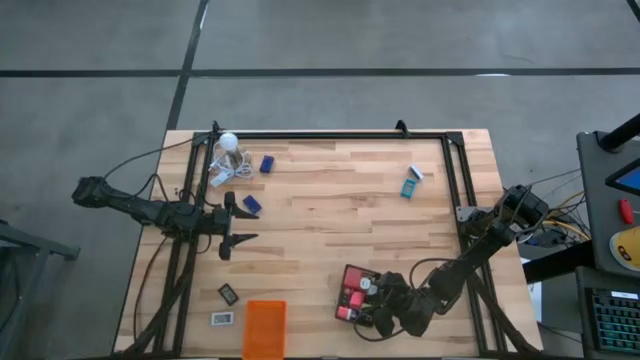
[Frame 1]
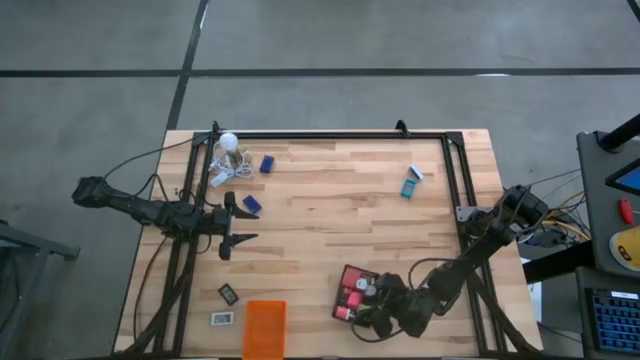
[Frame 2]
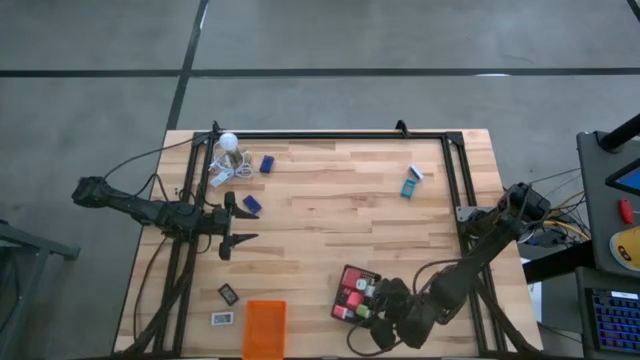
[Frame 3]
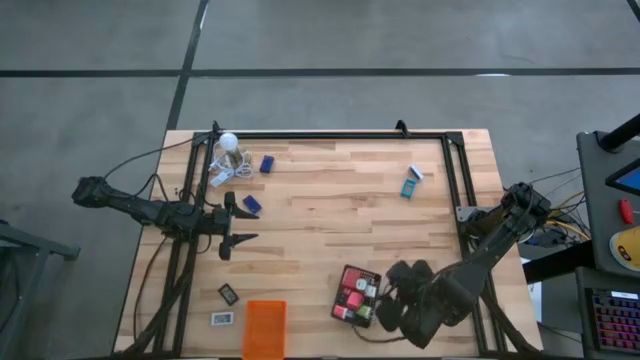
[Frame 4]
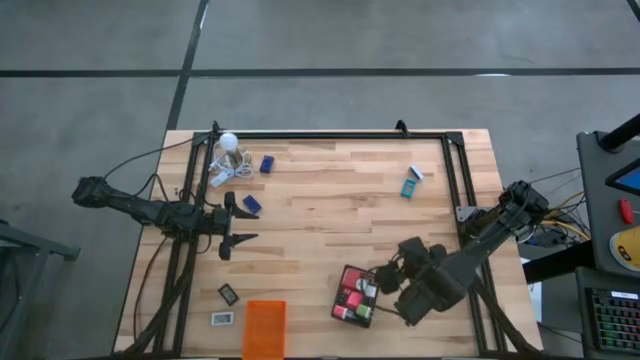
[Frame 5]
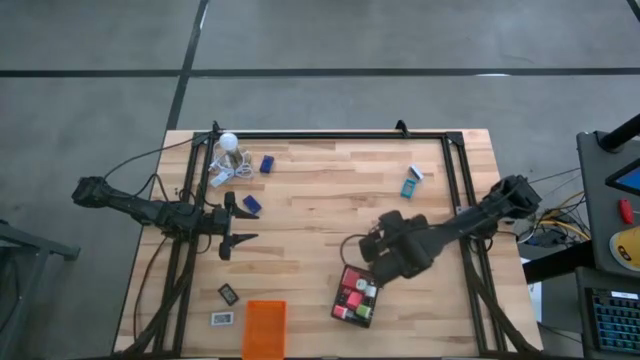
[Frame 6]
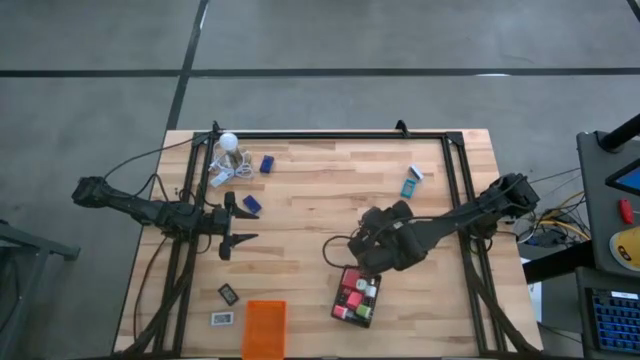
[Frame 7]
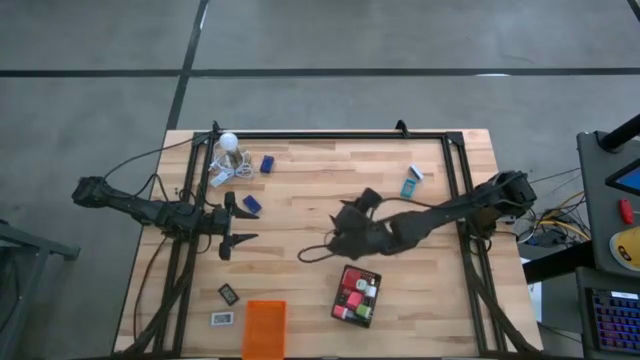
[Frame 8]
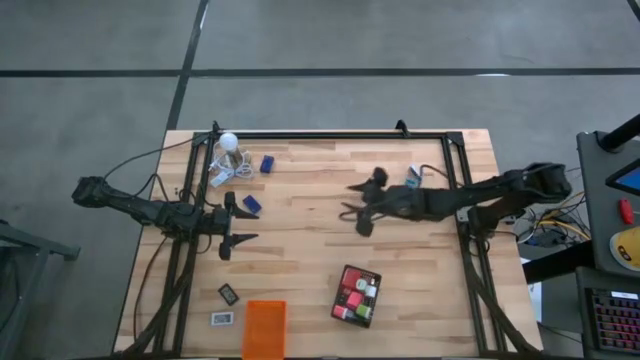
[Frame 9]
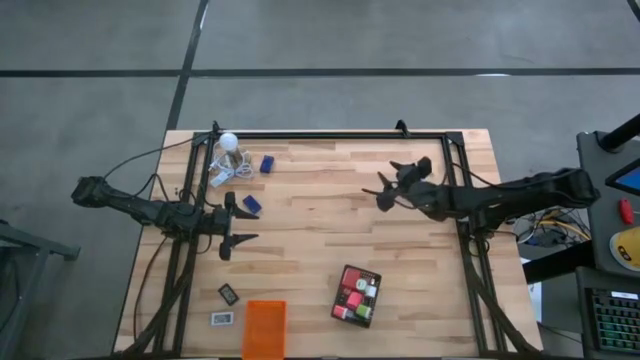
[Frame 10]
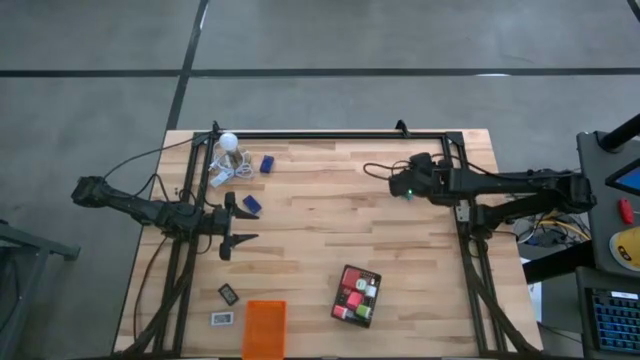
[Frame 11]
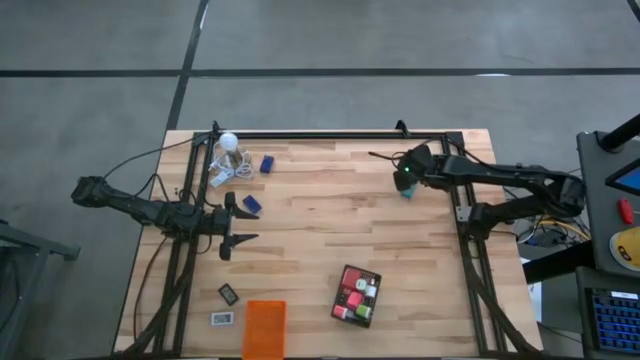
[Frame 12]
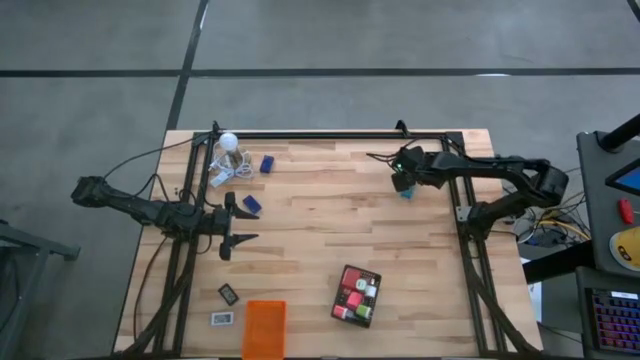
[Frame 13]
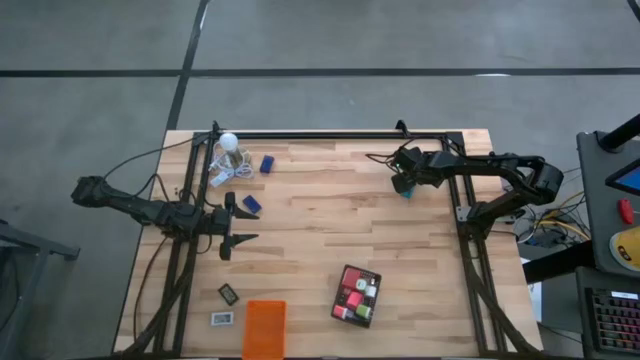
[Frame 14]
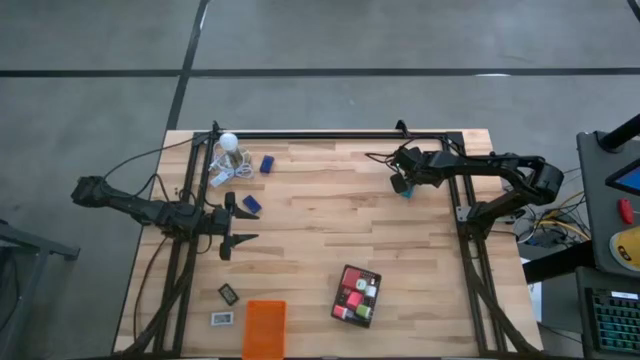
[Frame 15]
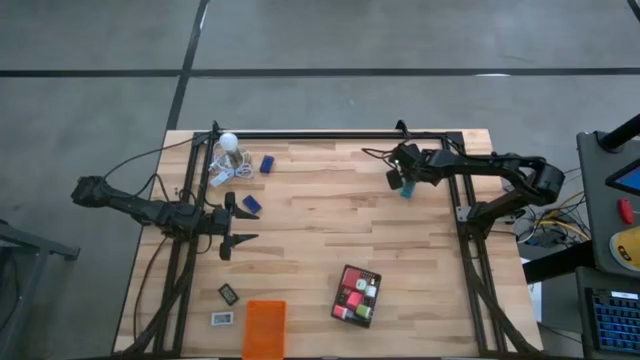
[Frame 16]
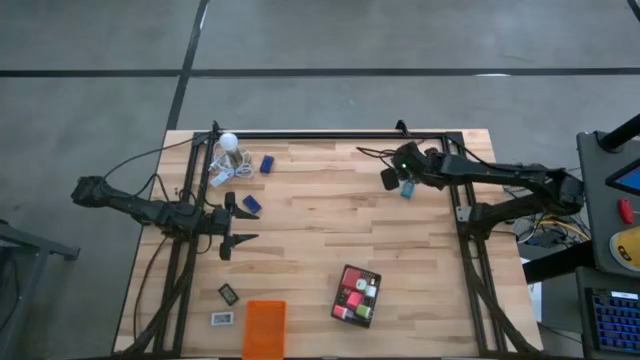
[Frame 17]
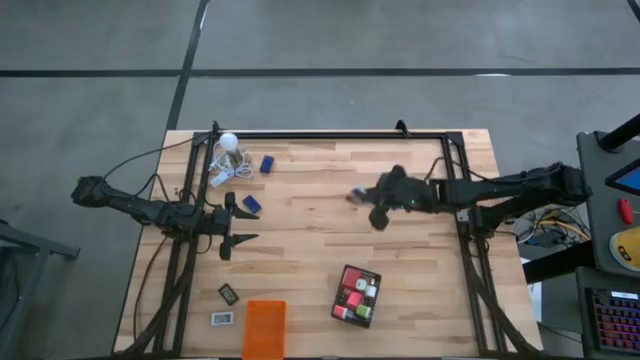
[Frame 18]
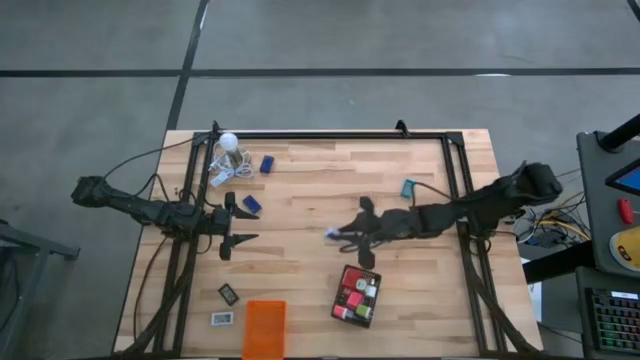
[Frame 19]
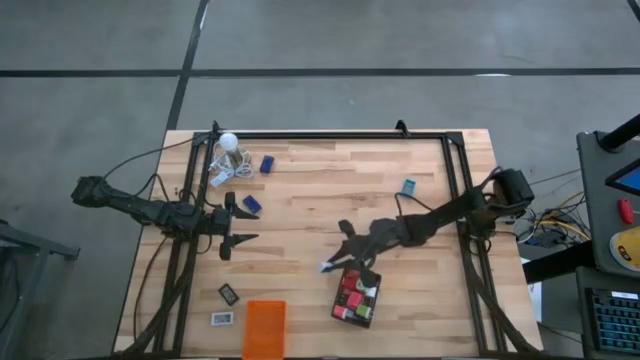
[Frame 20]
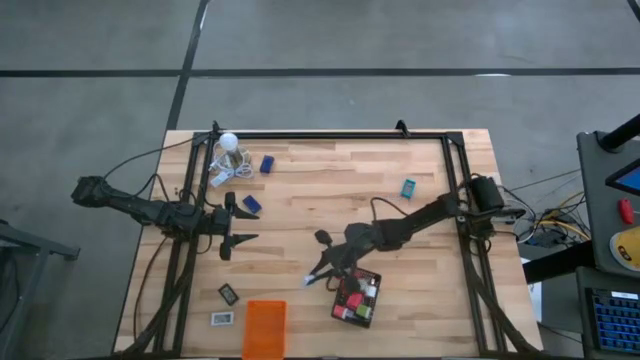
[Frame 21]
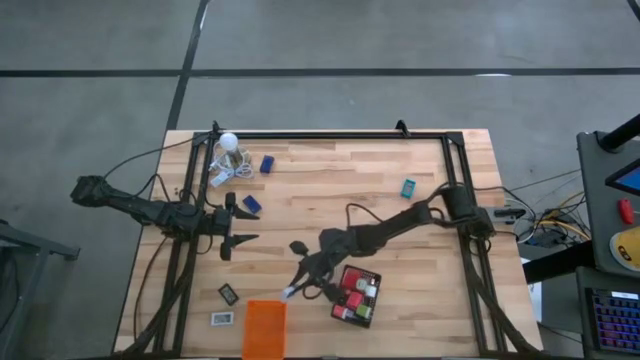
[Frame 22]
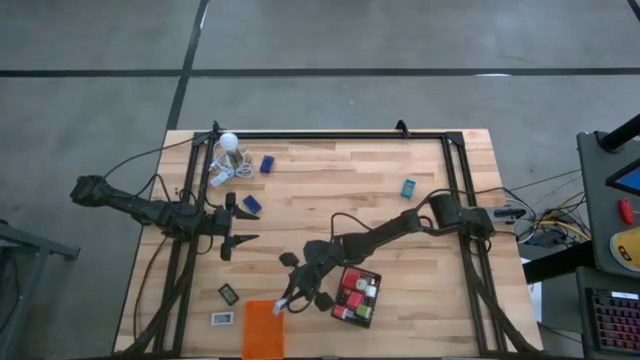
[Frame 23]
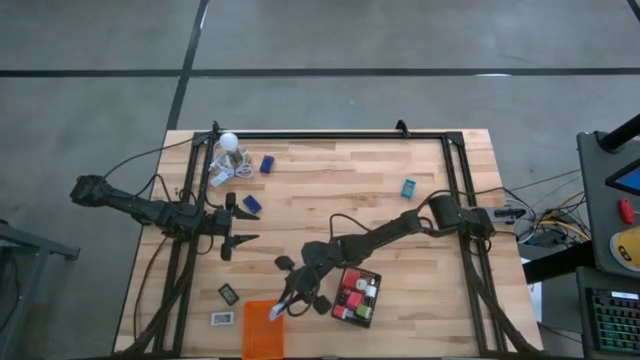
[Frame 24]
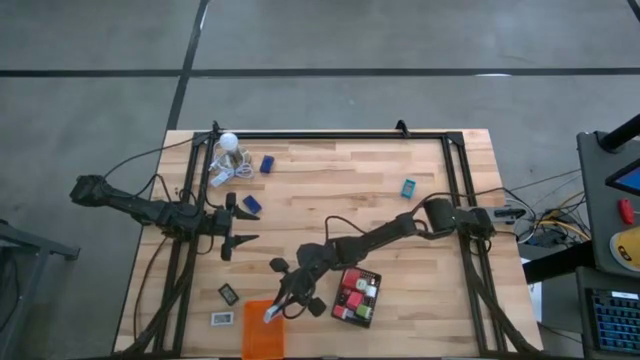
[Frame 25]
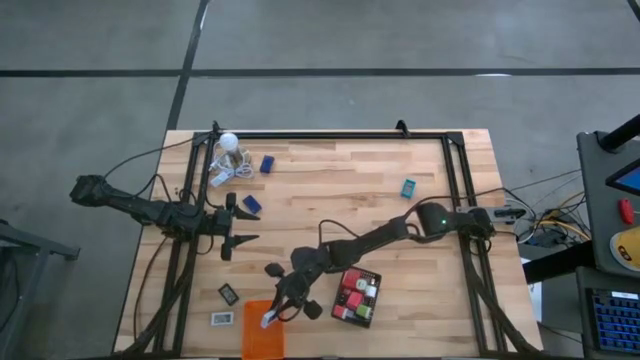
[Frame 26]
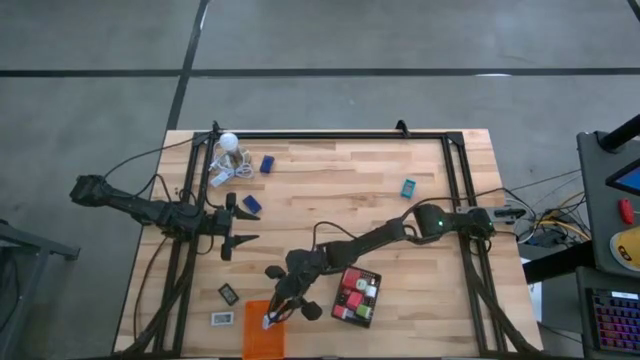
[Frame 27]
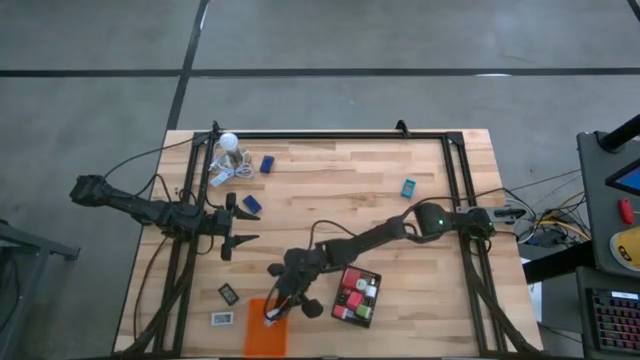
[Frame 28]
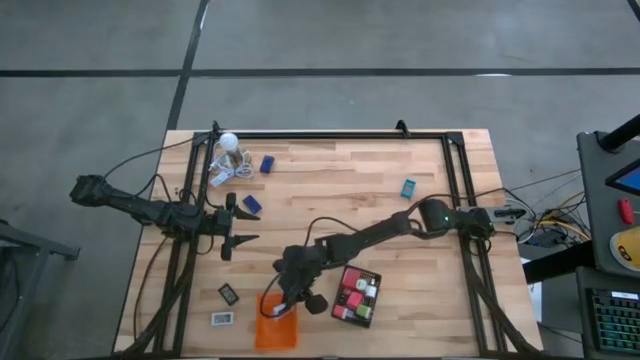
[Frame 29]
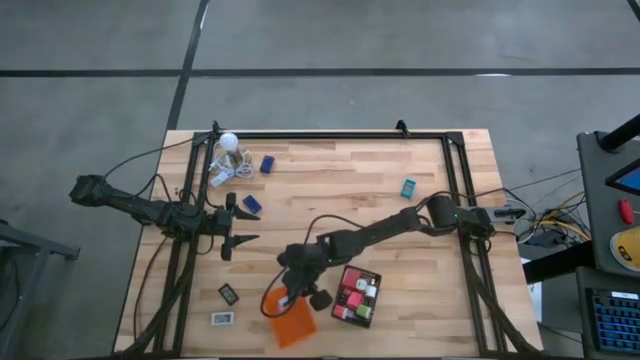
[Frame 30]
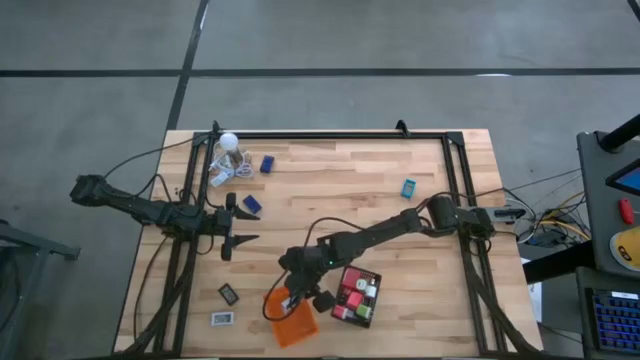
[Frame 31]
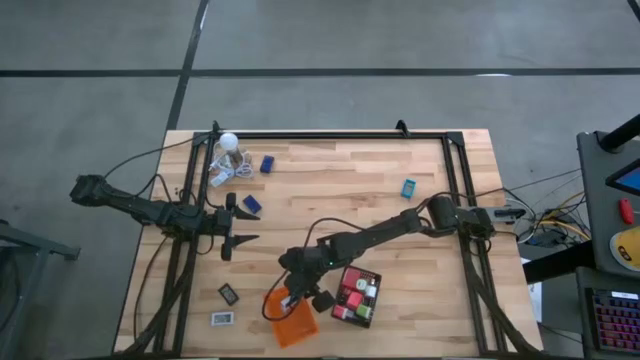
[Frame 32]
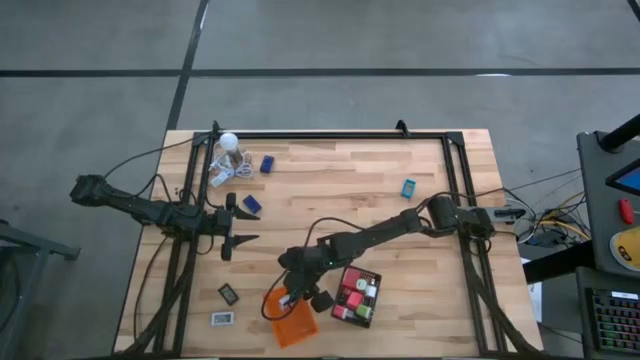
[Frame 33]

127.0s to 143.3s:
Task: Pick & Place Office items
Put the right white timer in the orange bin
